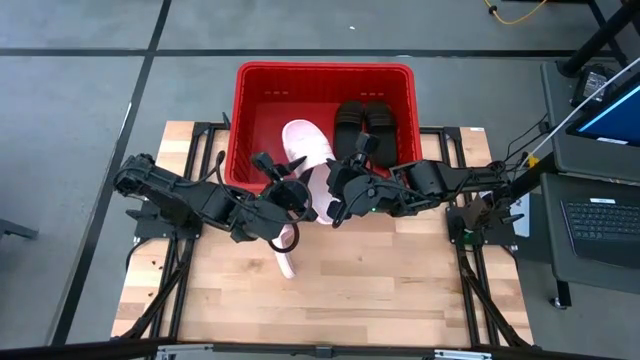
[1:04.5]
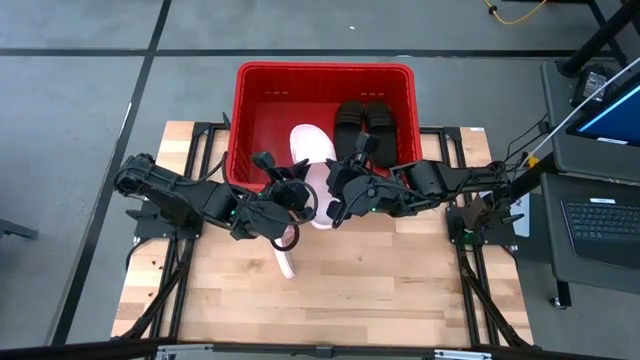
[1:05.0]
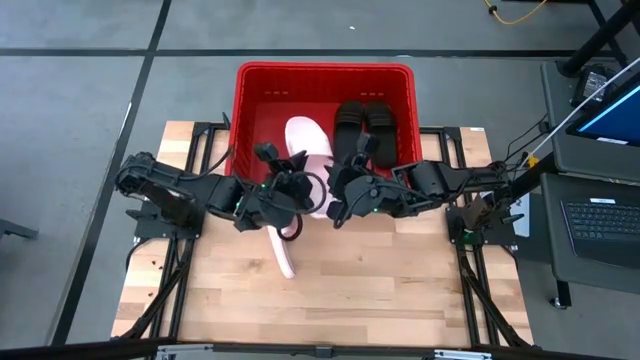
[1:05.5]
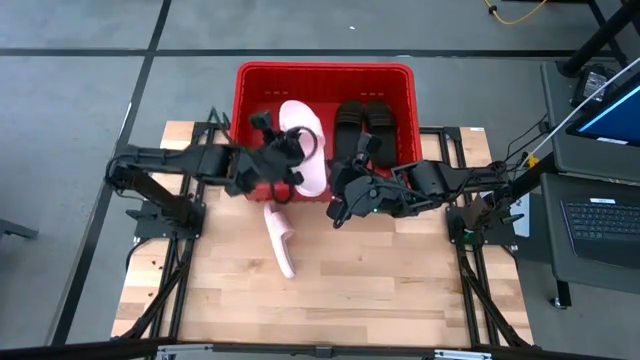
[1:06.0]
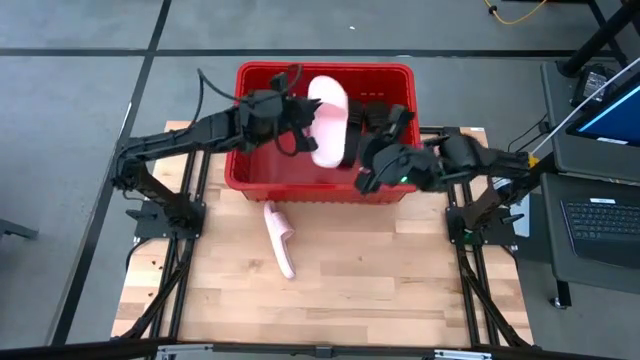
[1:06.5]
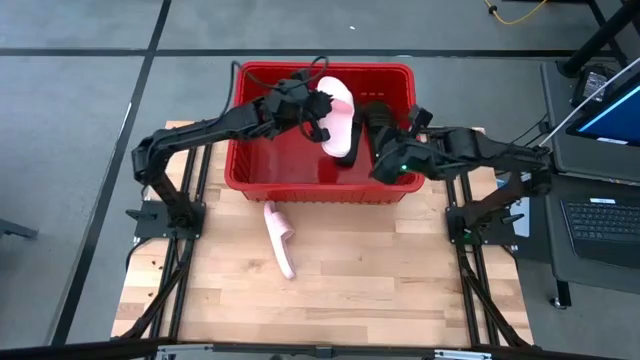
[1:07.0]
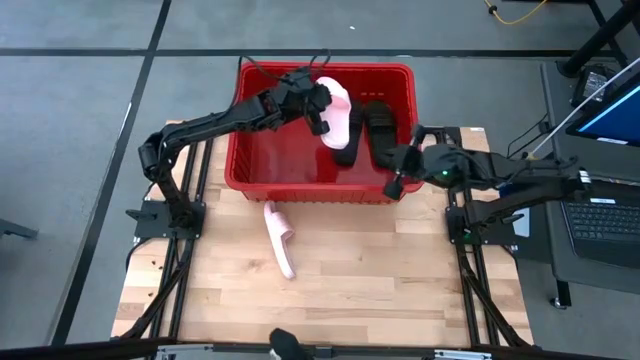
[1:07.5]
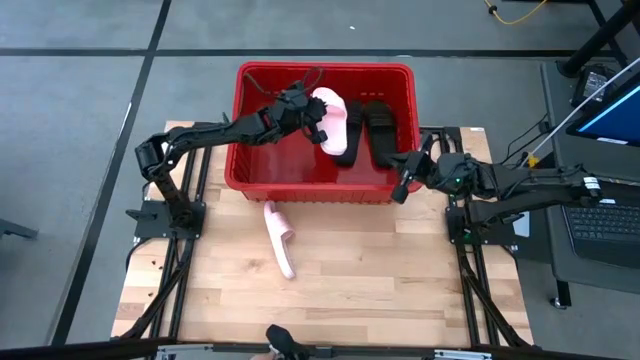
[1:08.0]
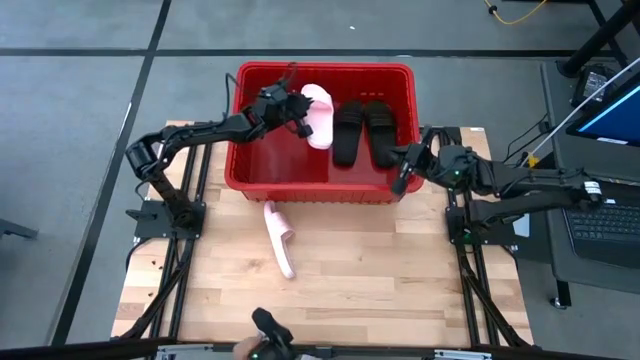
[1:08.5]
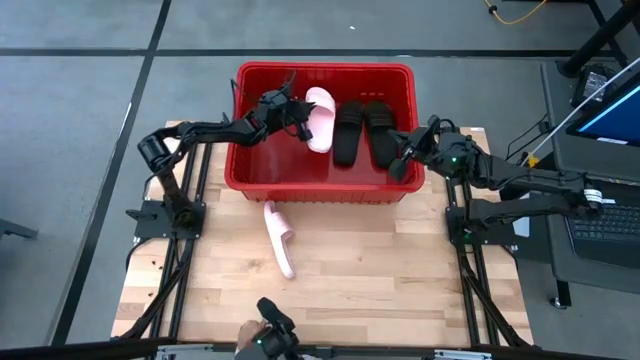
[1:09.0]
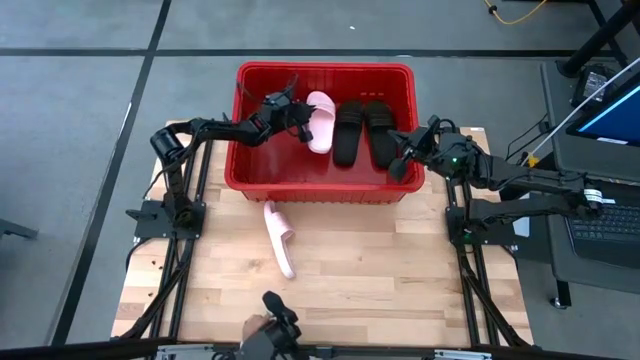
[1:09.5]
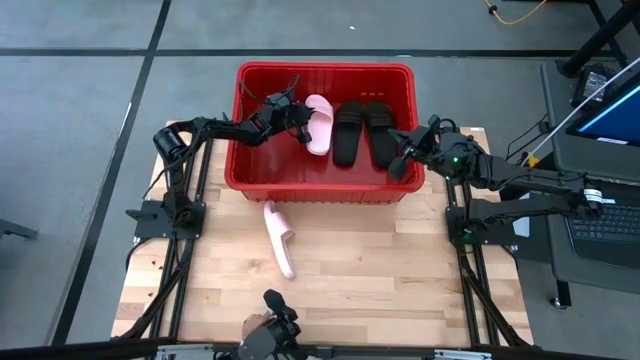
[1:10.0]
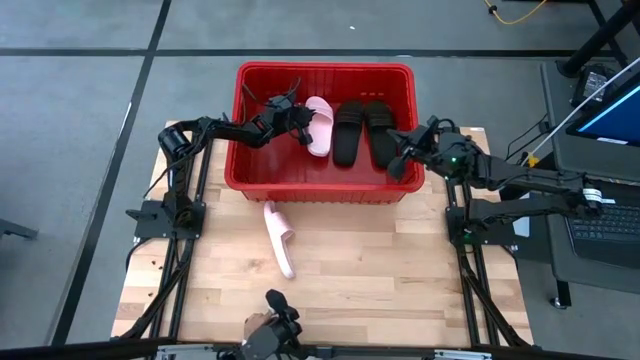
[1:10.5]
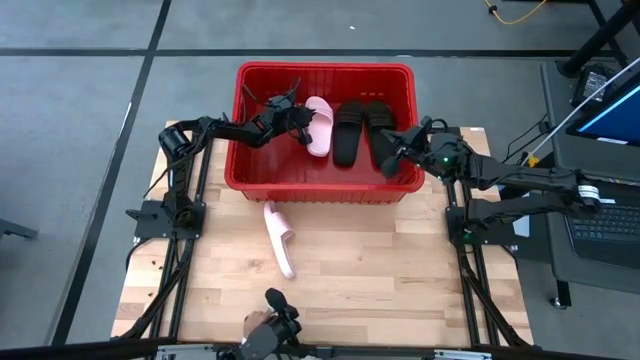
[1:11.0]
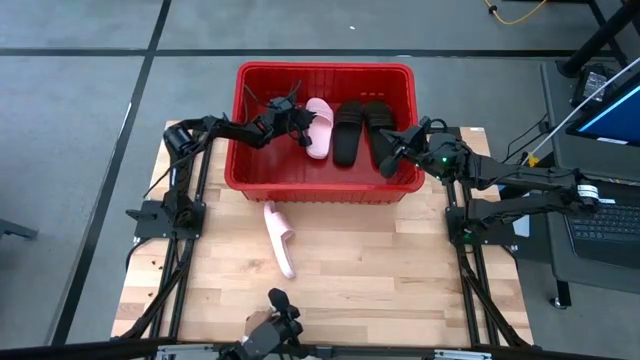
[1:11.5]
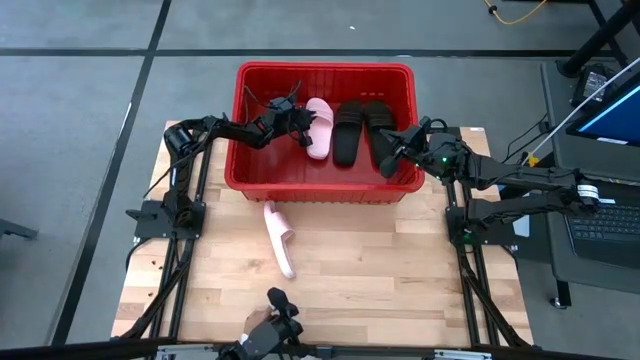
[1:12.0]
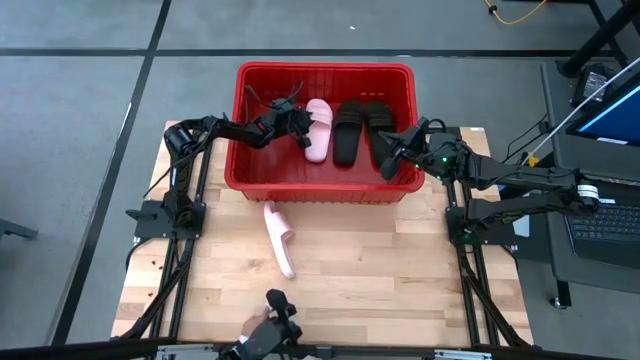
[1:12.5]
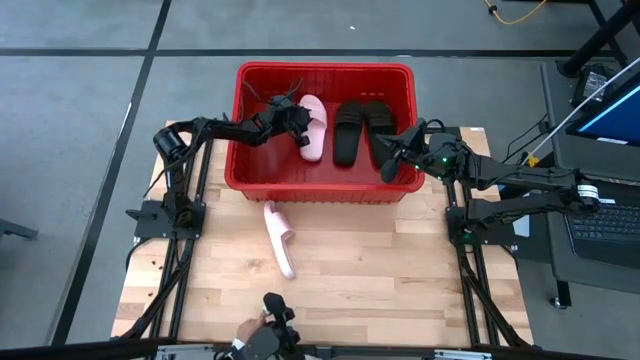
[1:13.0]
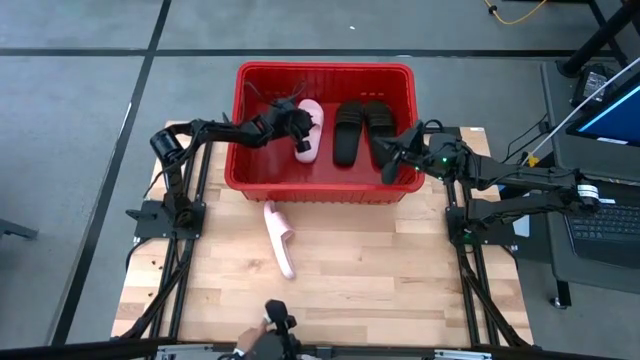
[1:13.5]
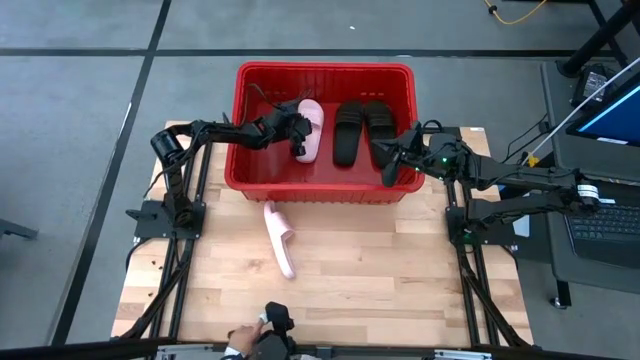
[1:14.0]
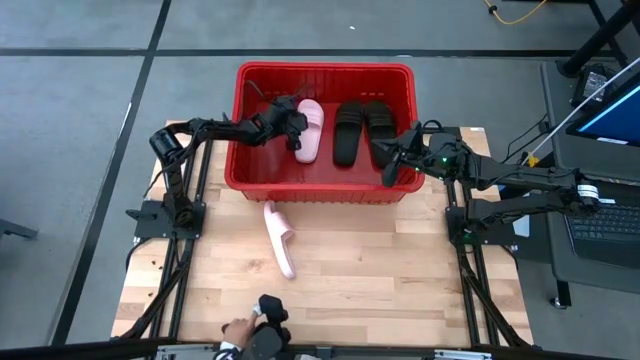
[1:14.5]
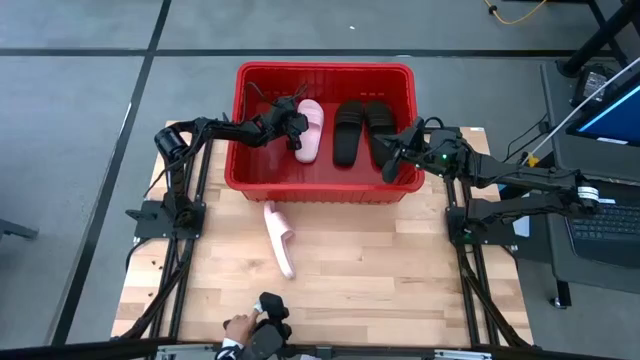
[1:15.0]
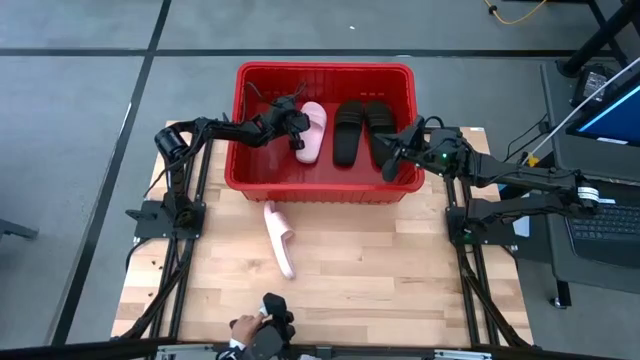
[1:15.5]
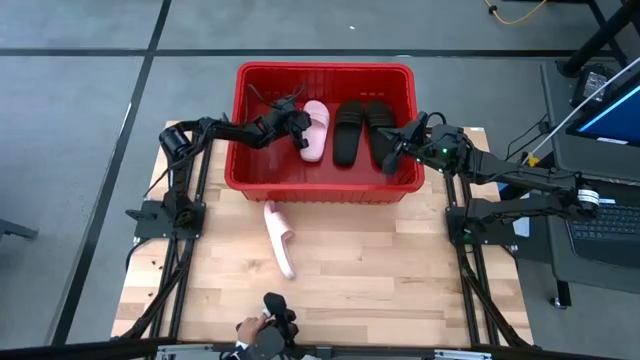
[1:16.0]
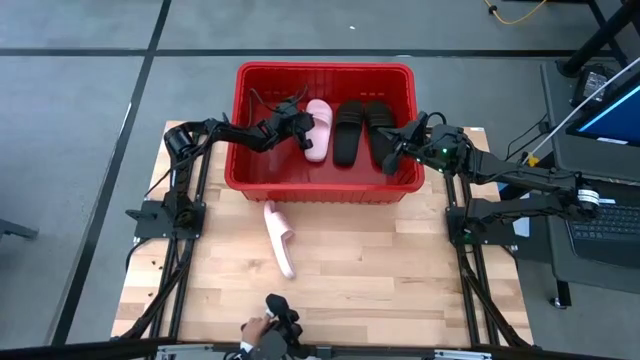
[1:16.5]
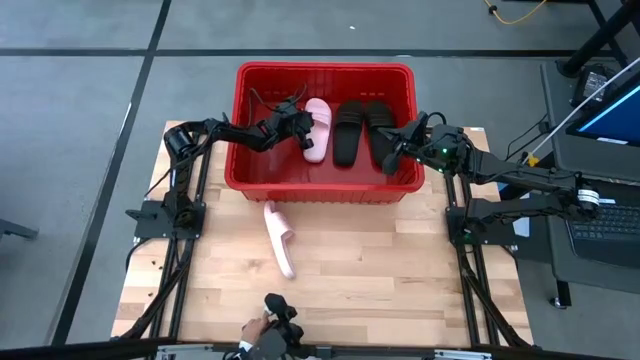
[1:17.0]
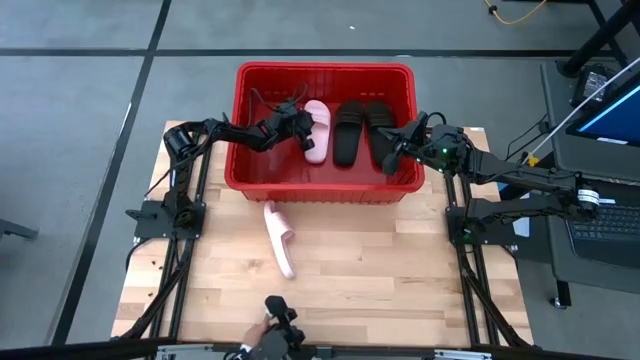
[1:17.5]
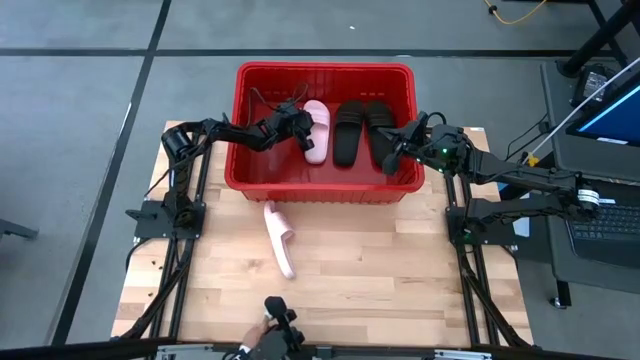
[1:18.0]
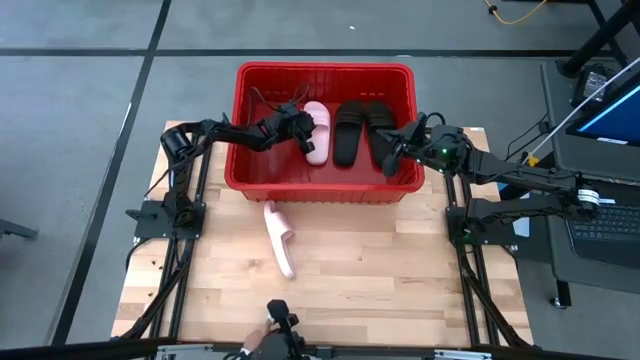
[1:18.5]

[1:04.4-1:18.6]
Task: Pick and place slides into bin
Put the right pink slide into the red bin

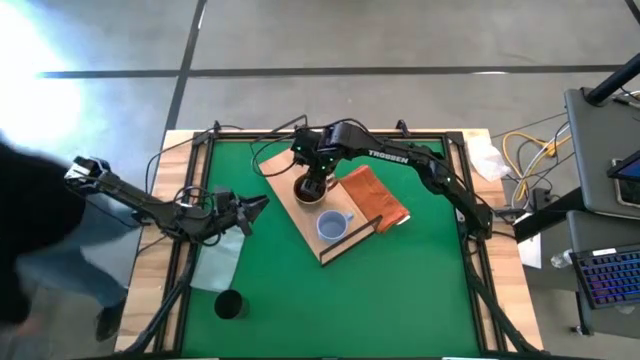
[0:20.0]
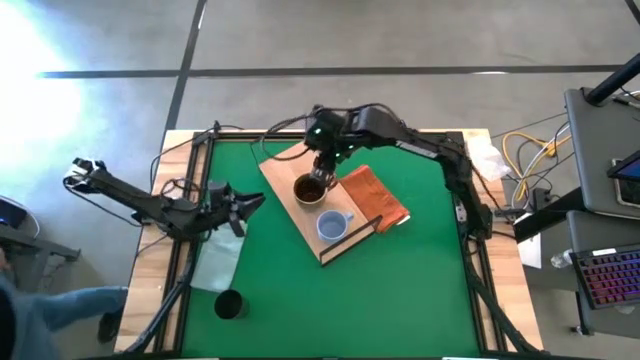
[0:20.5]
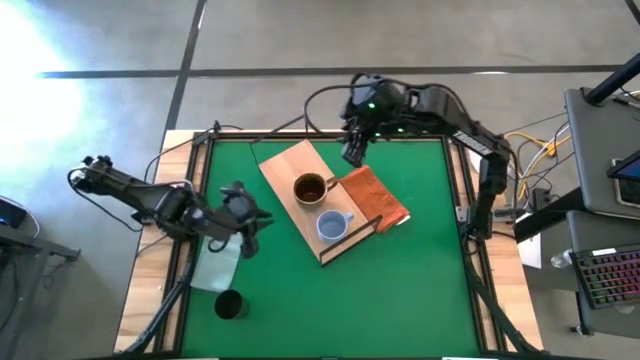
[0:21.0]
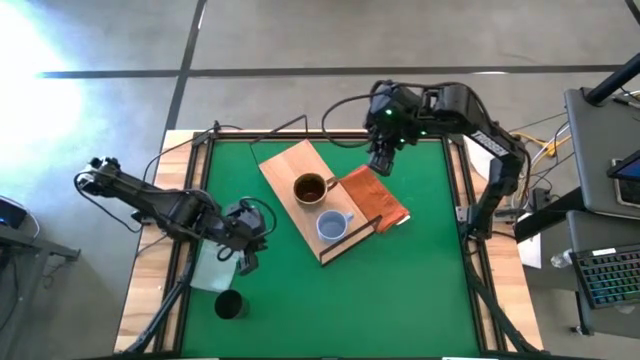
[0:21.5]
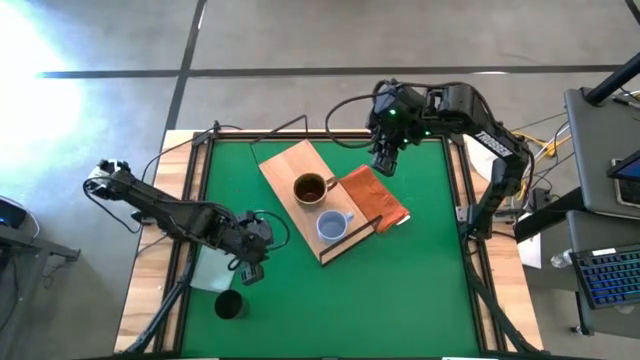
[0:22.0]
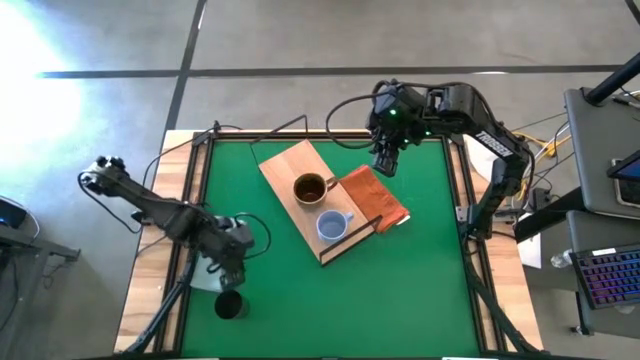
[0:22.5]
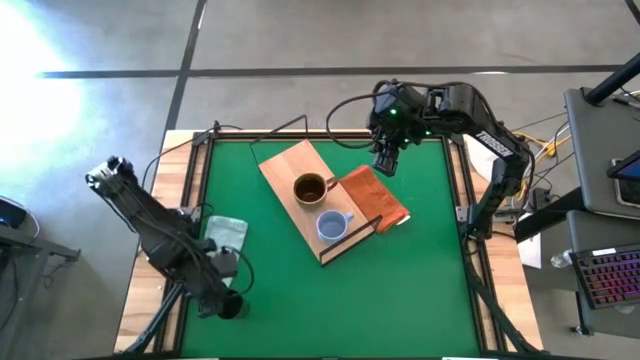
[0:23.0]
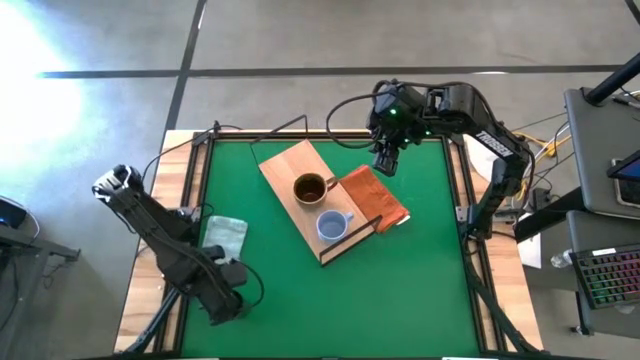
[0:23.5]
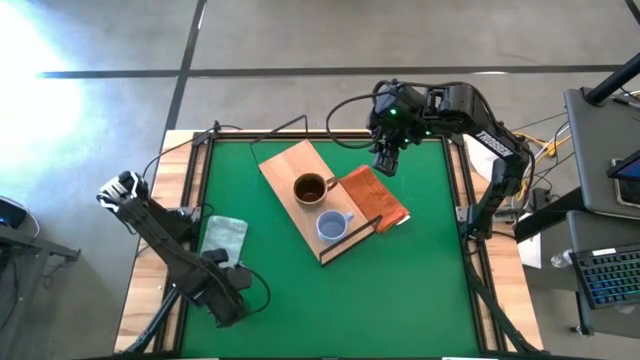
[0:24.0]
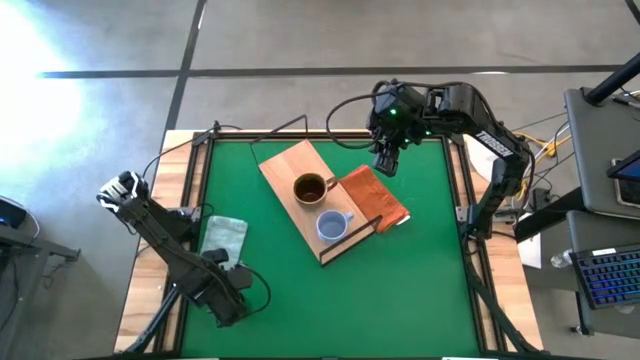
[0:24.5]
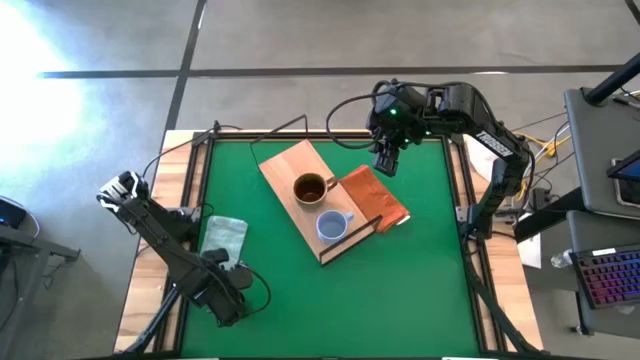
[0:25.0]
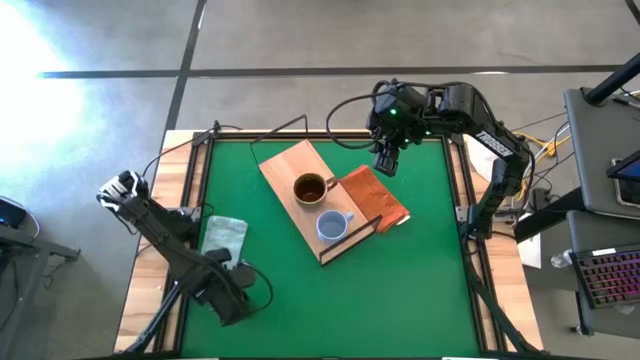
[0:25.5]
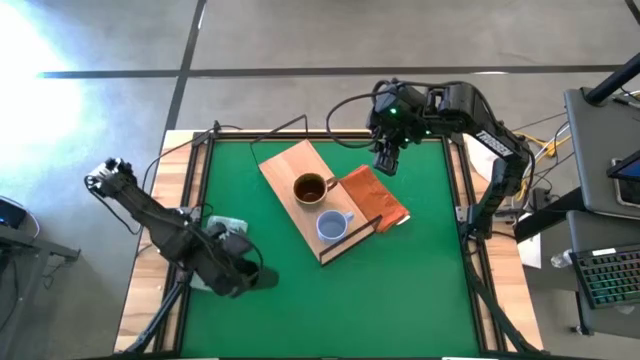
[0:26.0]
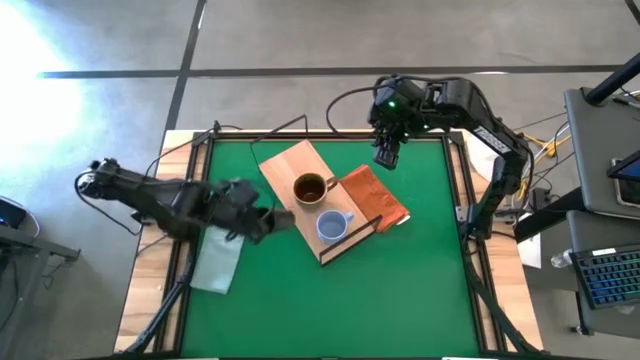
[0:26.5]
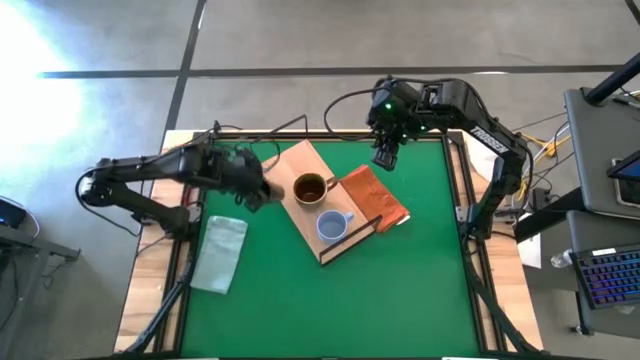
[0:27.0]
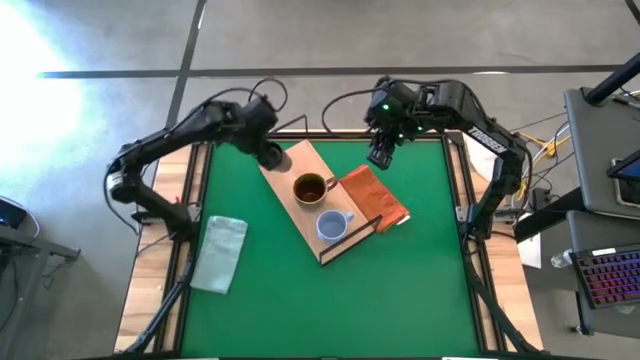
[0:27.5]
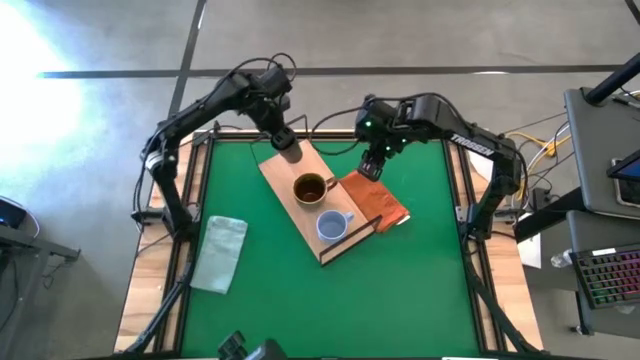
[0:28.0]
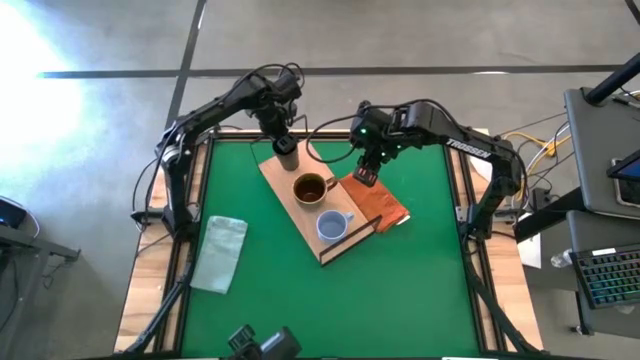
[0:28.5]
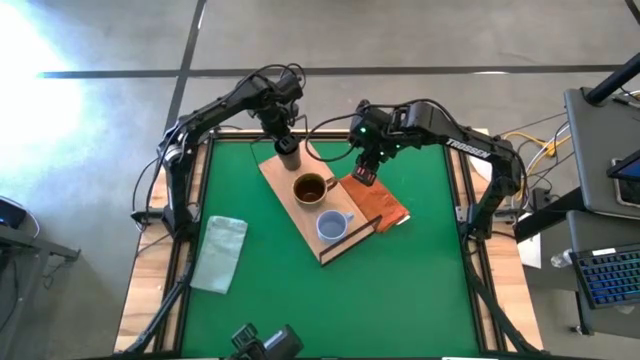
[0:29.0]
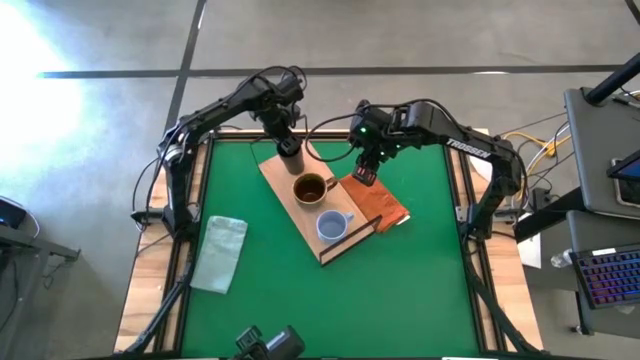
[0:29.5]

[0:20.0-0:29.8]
Task: Stack small to large cups/mugs on shelf
Put the black cup on the shelf
